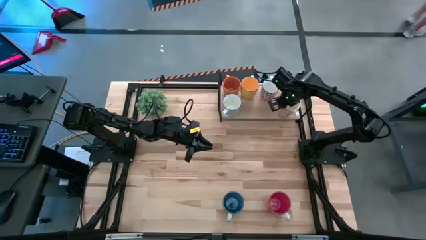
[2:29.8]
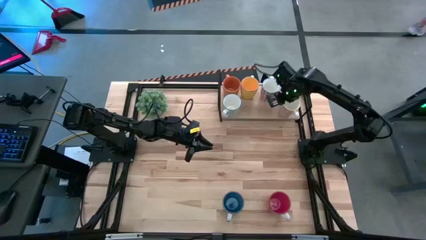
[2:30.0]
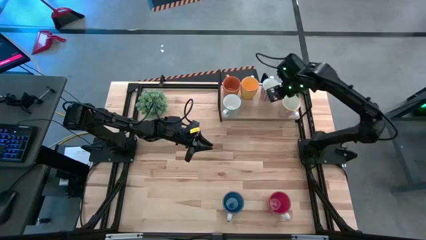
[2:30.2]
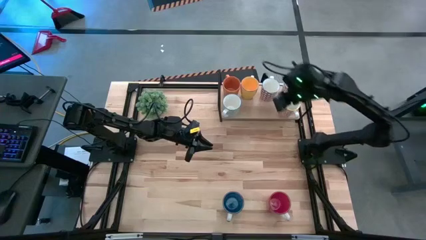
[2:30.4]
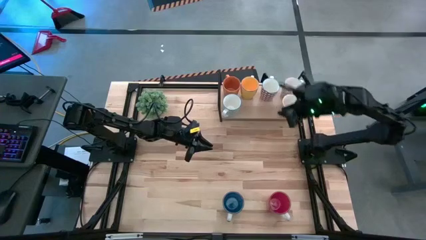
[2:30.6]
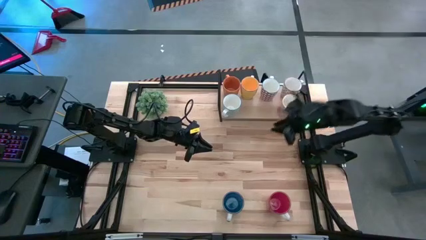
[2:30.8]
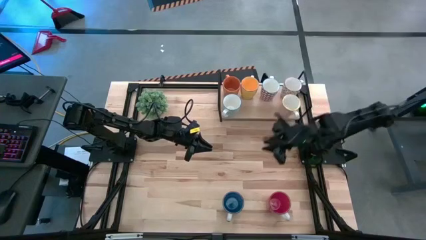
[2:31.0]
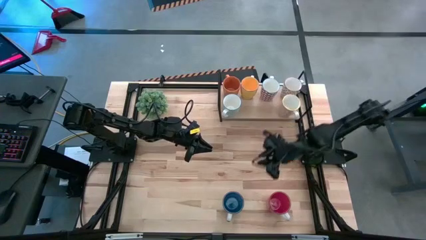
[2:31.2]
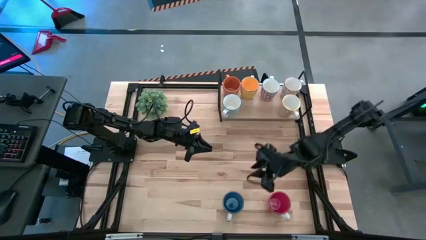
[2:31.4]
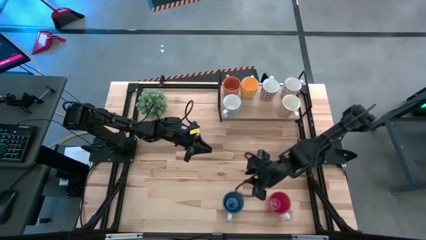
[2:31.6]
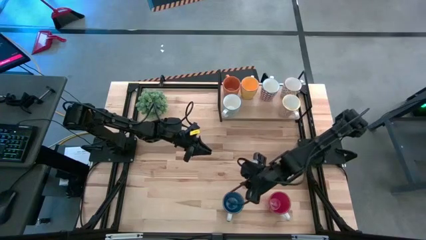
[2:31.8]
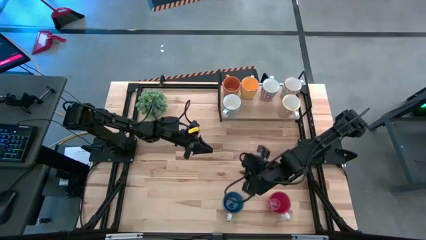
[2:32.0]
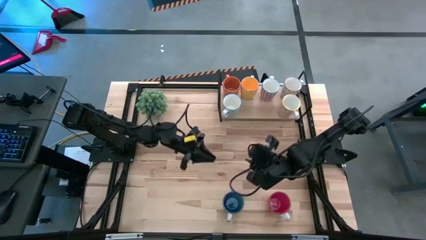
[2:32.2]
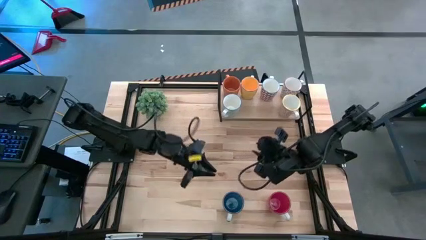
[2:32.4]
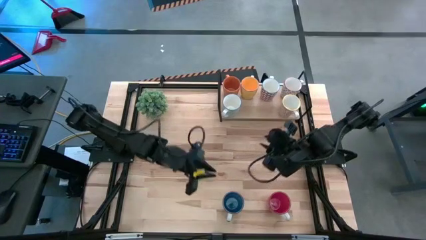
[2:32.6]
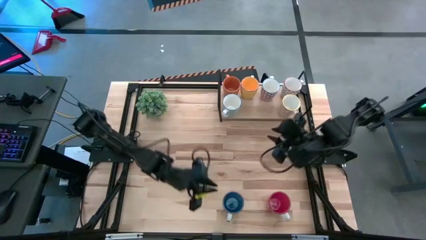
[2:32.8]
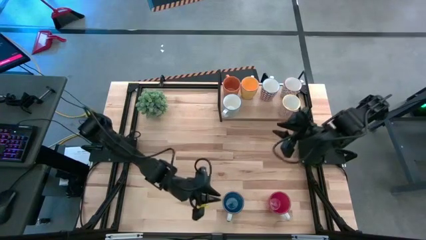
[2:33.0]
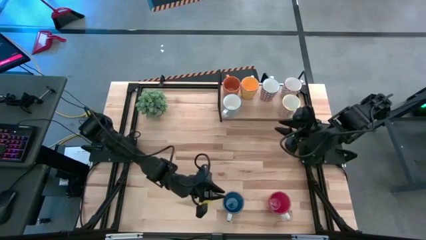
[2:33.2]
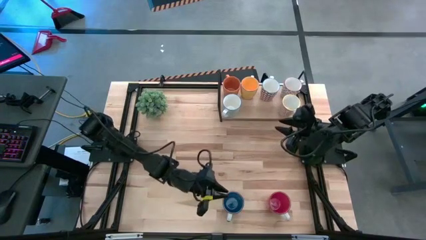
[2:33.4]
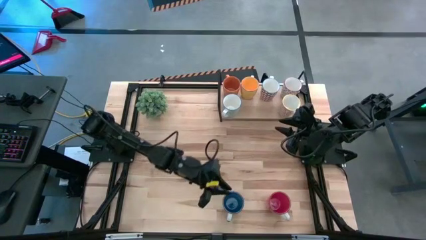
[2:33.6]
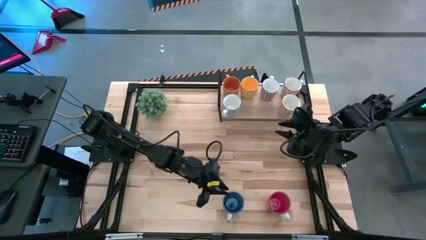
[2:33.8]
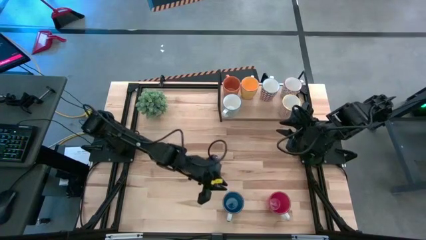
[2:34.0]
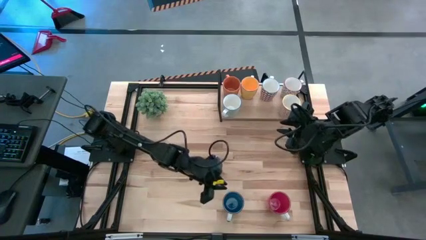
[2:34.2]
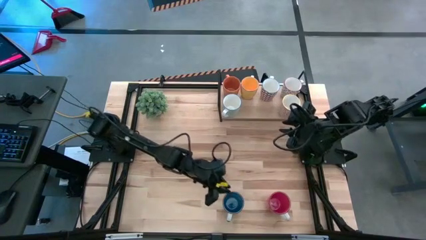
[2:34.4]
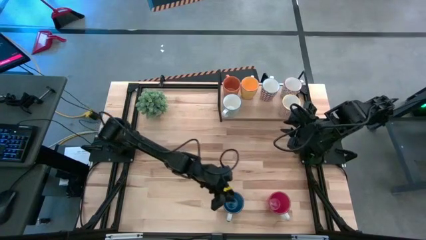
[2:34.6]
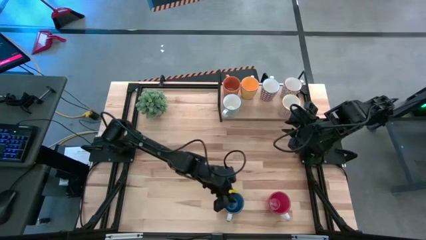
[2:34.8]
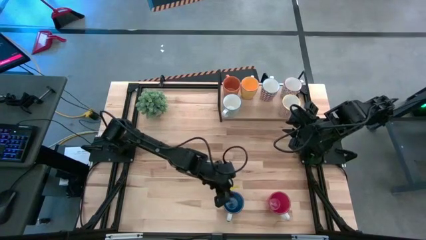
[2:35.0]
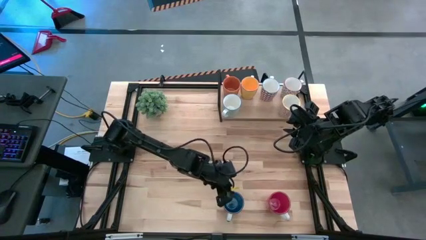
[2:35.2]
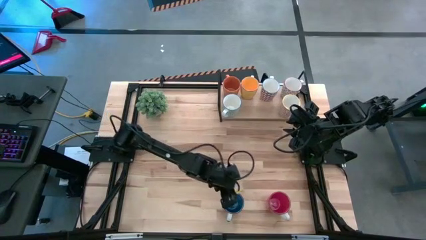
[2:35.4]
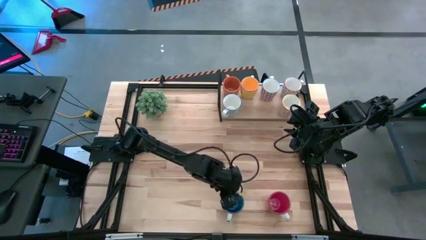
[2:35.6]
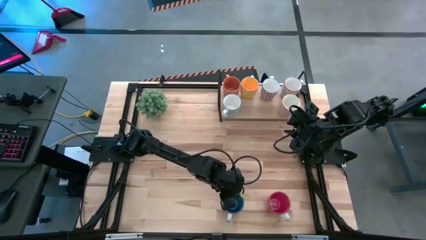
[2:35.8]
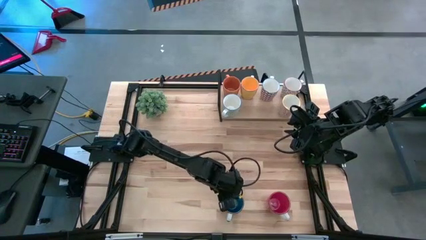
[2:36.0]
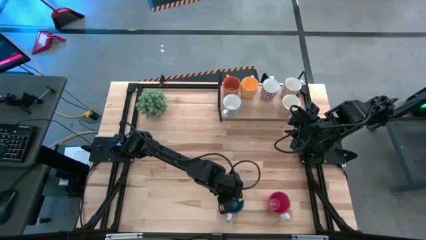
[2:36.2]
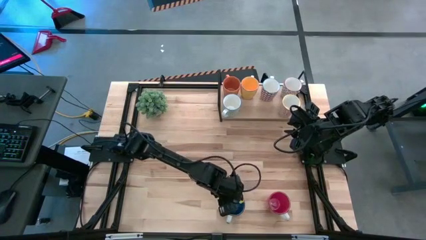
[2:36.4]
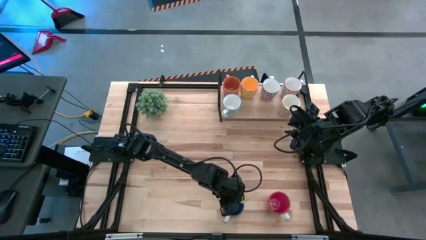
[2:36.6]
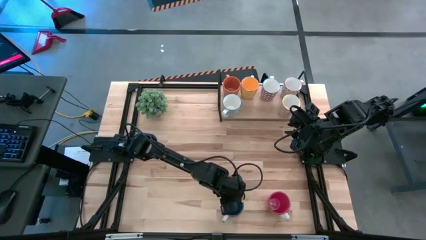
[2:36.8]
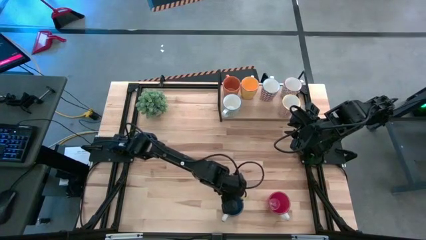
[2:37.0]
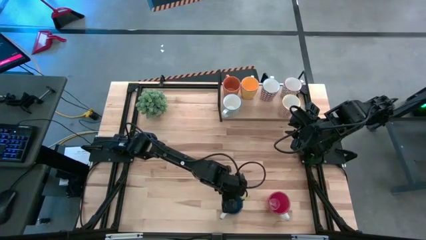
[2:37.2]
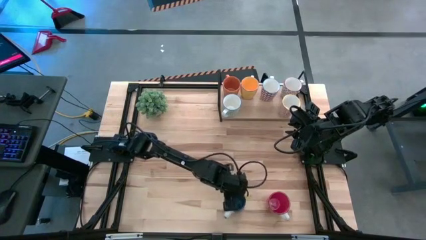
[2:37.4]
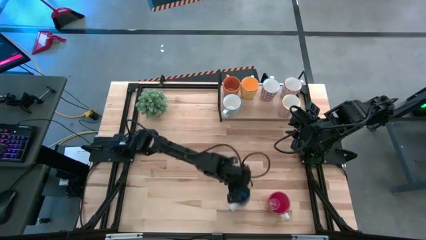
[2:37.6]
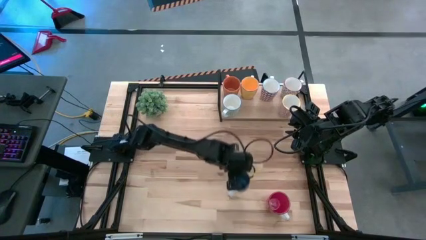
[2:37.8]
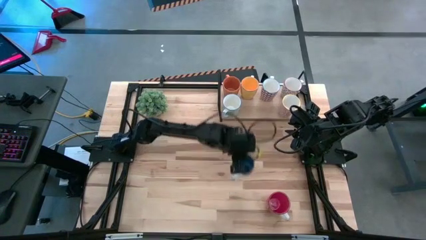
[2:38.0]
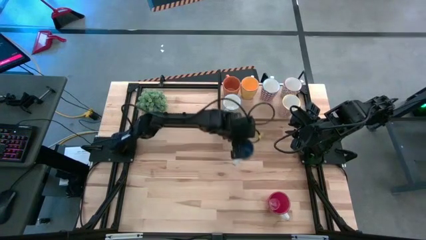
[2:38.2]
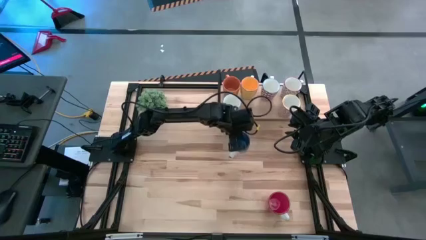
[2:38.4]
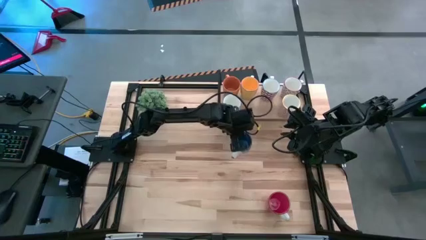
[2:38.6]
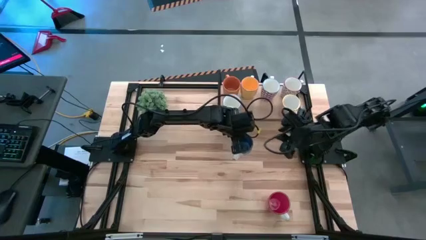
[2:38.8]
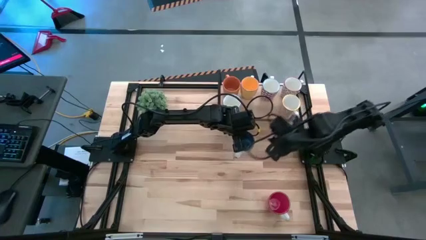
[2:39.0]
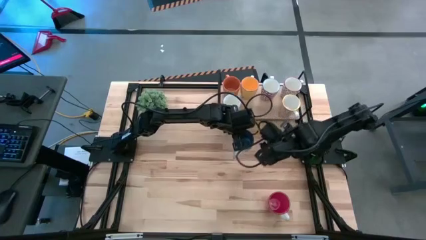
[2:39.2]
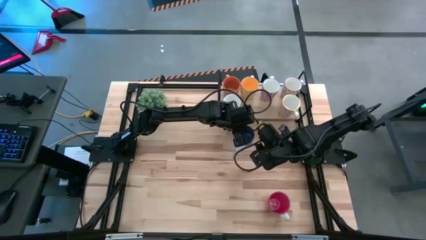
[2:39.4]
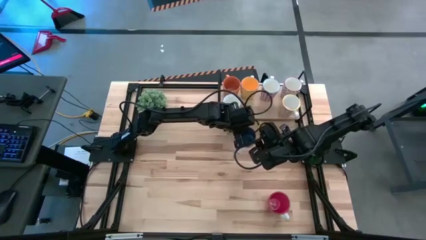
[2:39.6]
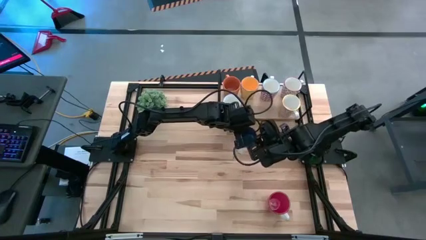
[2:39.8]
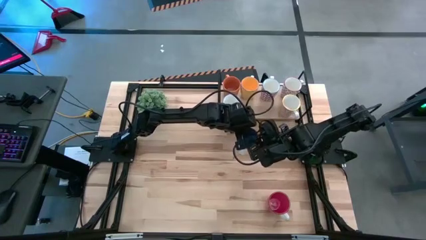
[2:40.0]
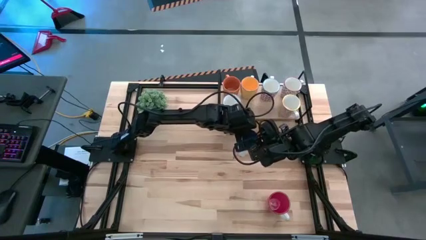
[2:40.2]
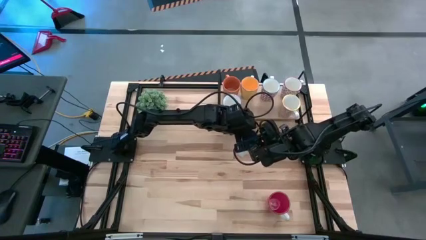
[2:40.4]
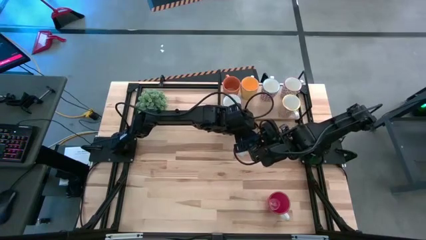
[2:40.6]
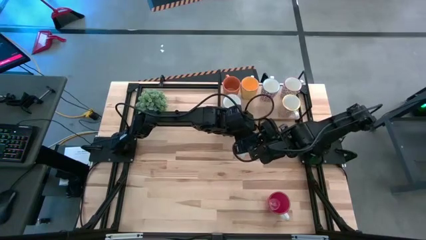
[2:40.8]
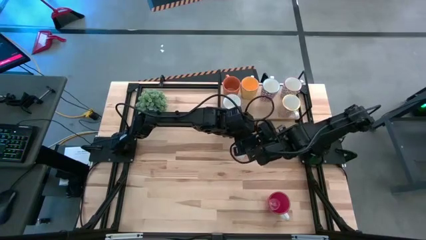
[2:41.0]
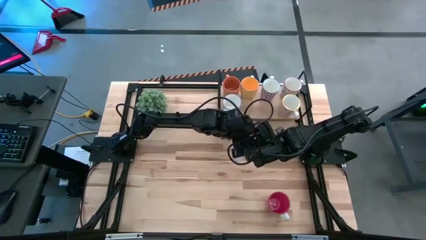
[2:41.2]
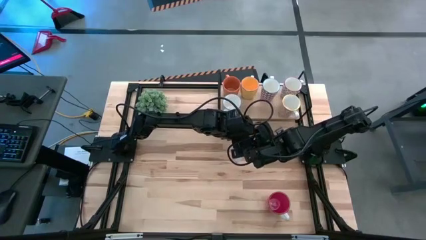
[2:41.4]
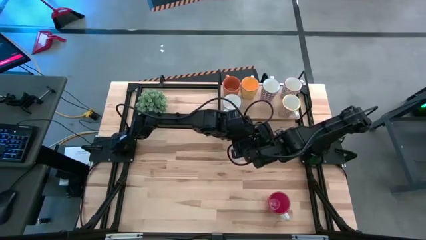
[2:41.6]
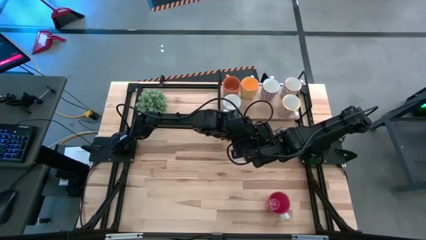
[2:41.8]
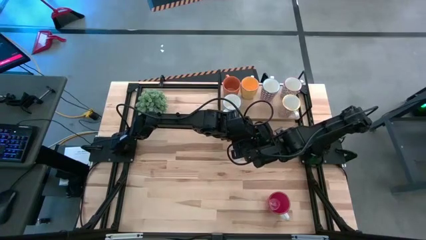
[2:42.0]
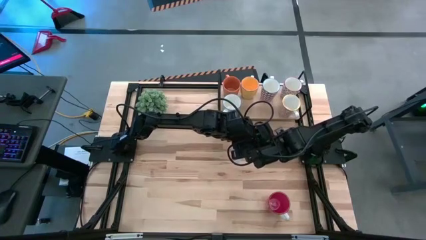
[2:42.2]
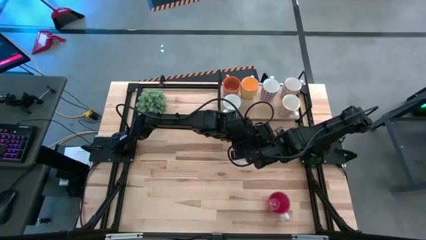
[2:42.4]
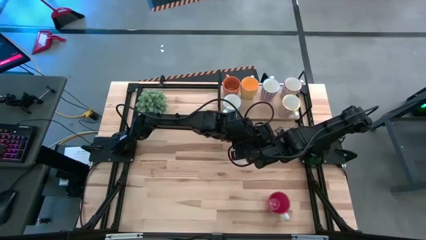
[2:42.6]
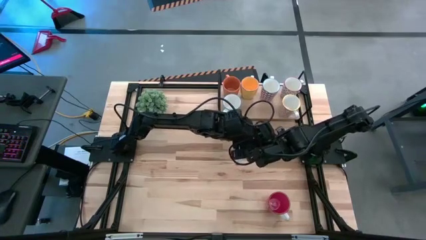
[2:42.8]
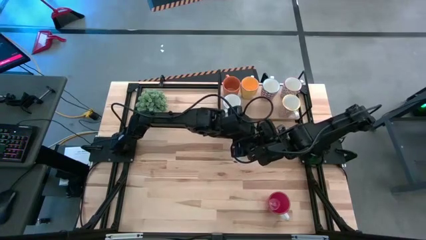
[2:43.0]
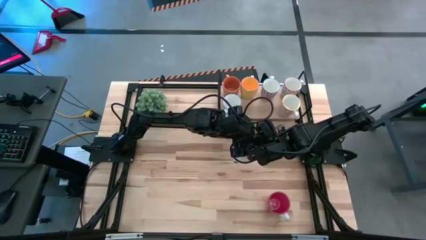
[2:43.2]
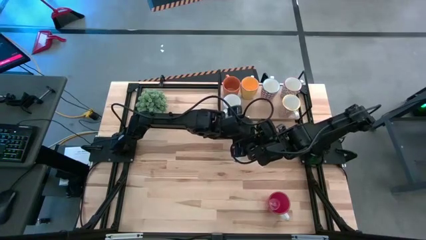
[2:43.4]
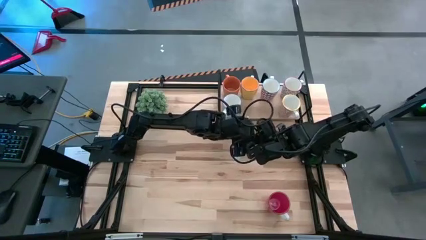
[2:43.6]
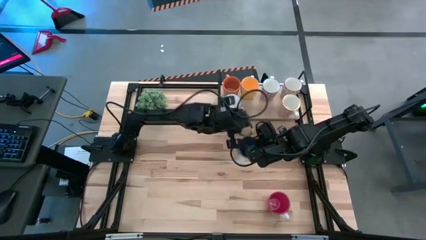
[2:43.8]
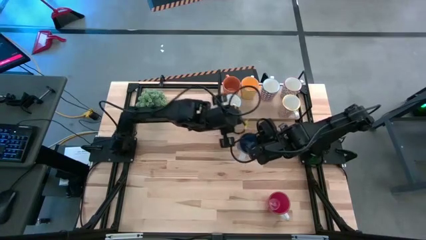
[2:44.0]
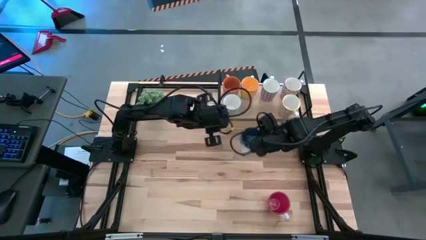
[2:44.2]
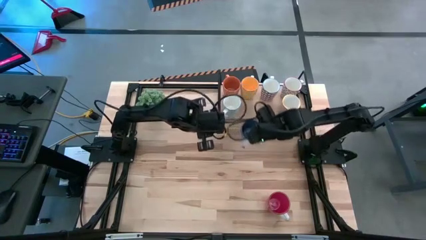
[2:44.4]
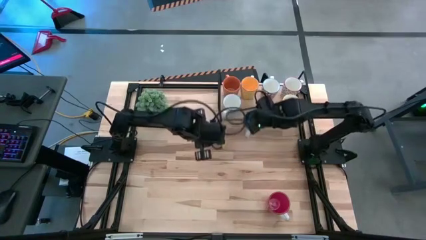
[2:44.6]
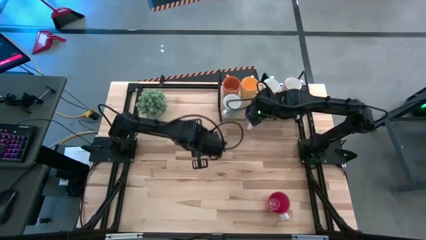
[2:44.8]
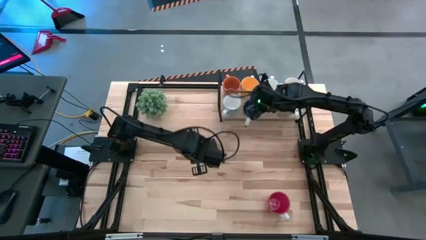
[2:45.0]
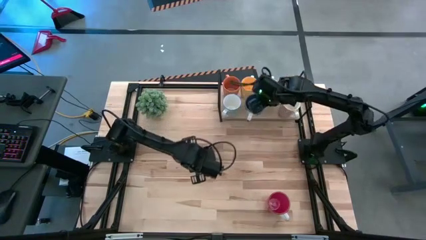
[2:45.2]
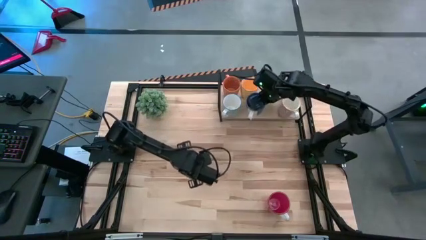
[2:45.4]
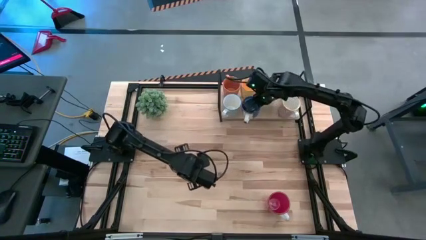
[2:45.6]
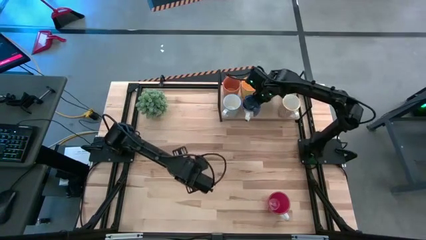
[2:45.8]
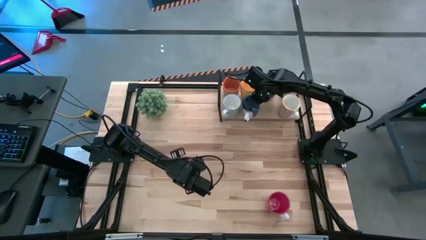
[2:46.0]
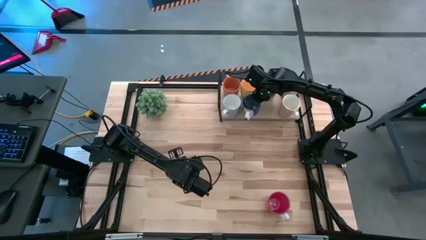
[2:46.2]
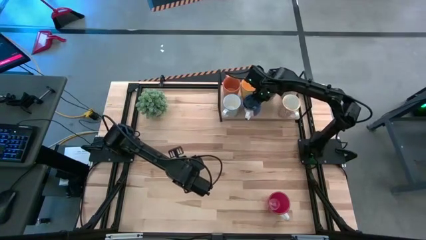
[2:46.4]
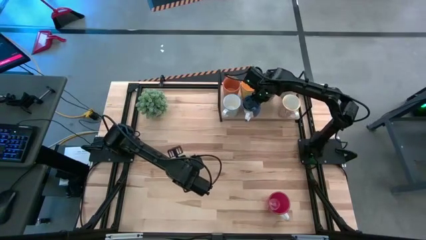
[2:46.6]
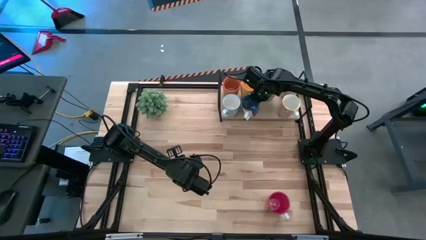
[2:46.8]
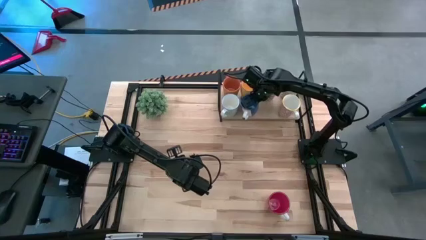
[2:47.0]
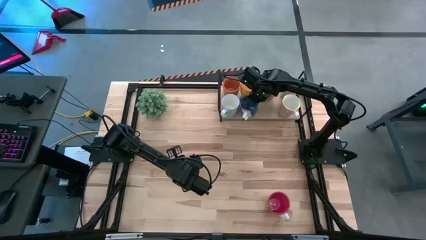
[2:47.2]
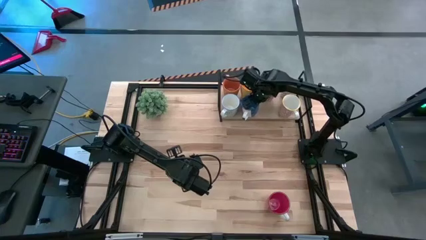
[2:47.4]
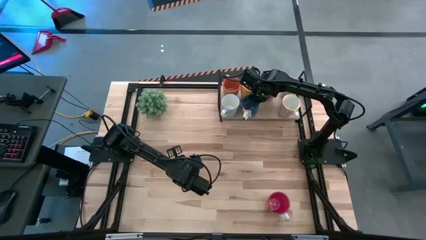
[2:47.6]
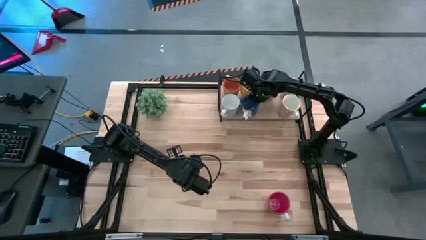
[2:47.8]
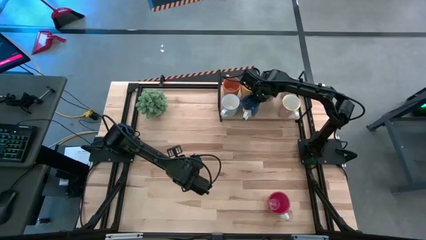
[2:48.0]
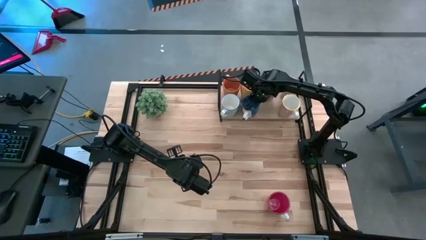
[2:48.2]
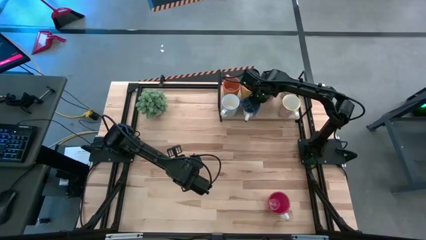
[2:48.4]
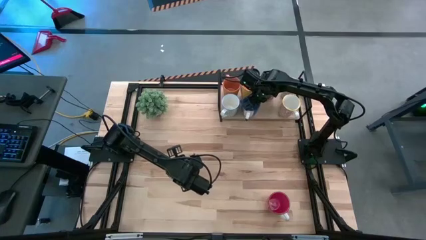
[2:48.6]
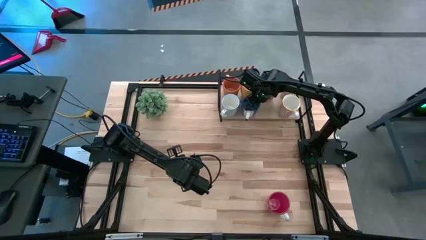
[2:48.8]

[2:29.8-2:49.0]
Task: Place coffee mugs
Put the blue mug on the shelf
